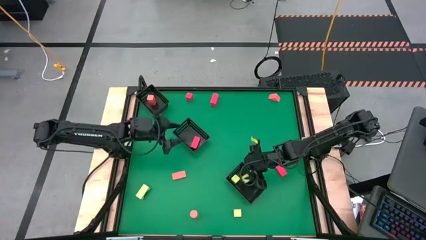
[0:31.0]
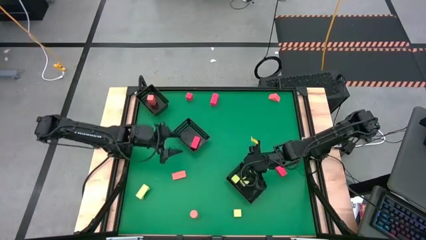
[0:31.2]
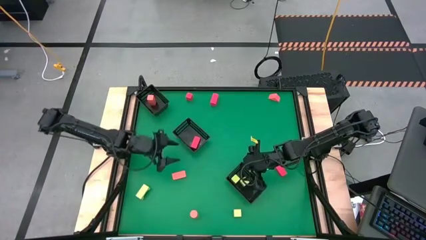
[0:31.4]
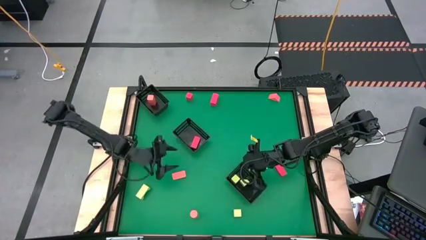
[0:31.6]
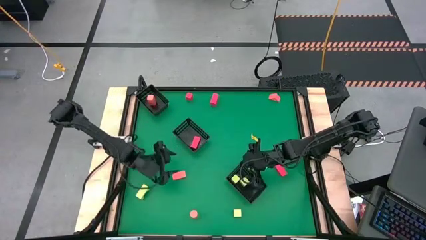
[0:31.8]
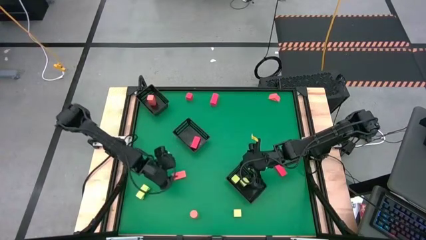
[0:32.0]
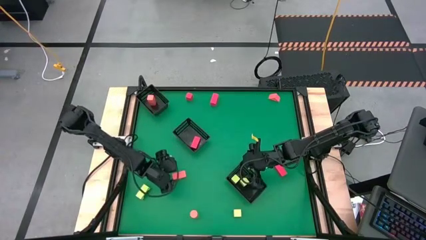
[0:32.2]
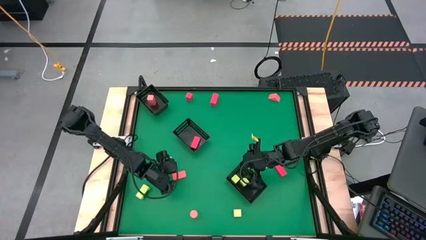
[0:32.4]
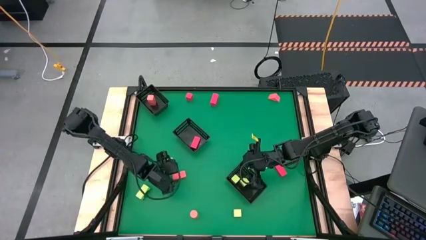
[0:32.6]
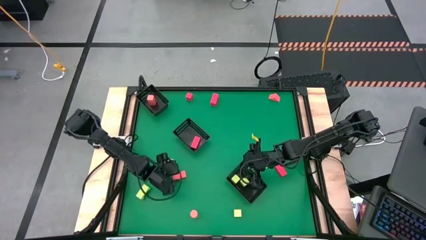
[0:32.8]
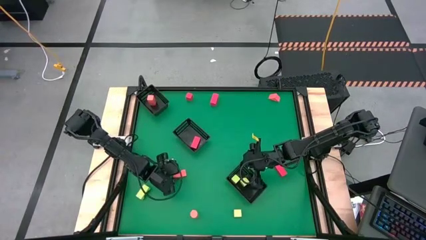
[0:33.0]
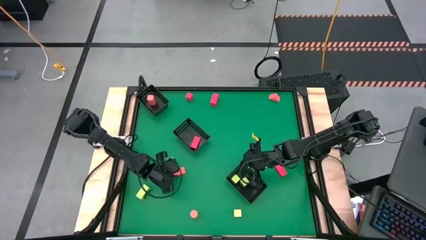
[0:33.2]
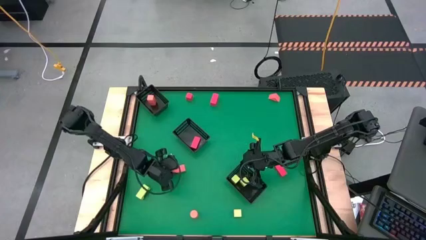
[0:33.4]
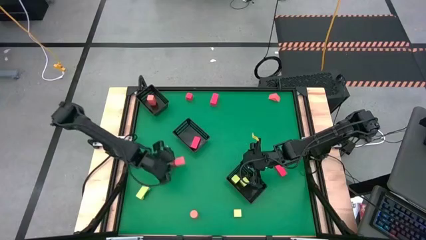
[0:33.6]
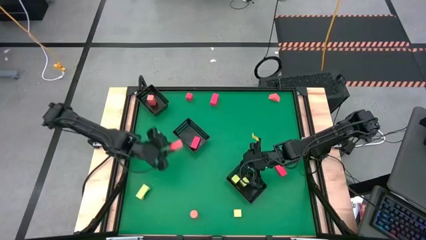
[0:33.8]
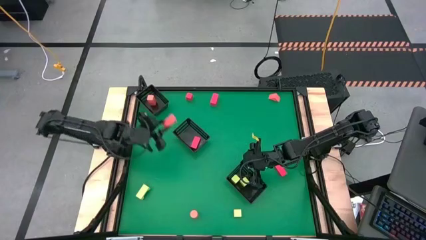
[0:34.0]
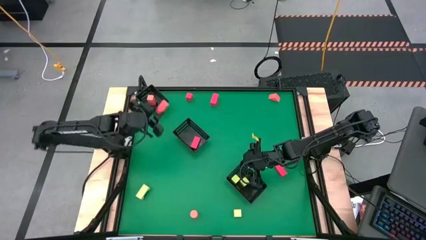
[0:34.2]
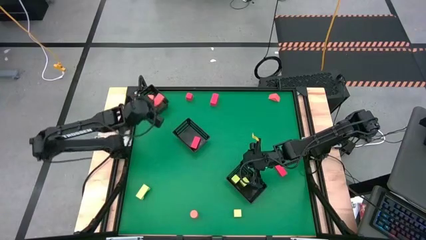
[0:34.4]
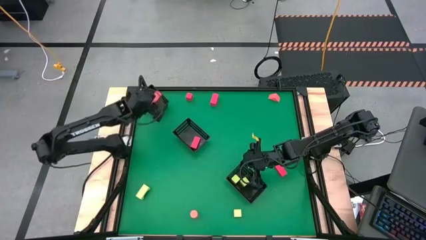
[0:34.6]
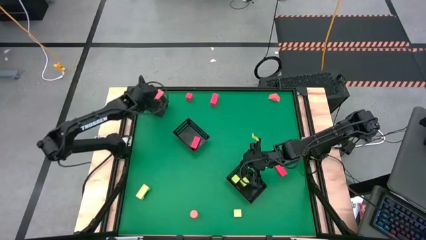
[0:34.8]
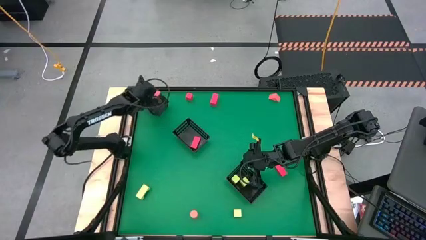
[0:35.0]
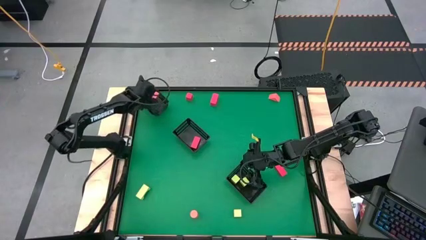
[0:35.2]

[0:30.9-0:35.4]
Task: Sort & place blocks by color
Put the light orange block into the top black bin

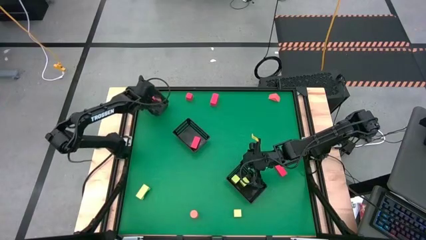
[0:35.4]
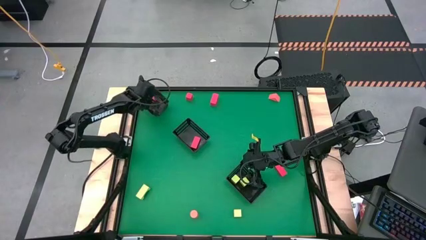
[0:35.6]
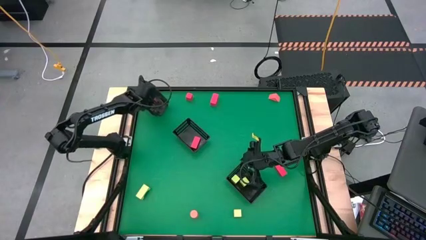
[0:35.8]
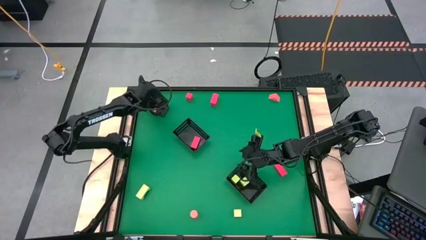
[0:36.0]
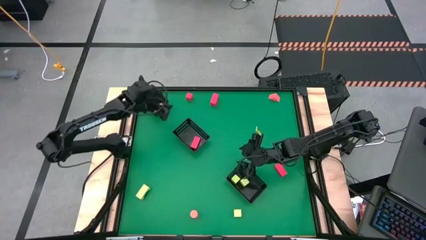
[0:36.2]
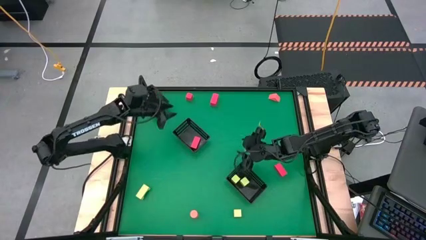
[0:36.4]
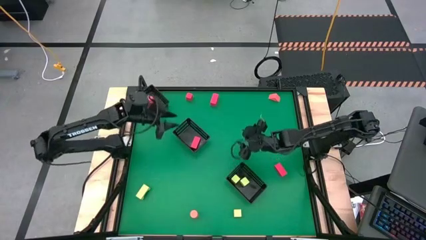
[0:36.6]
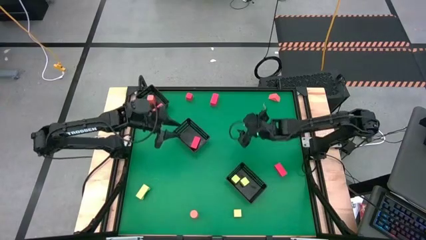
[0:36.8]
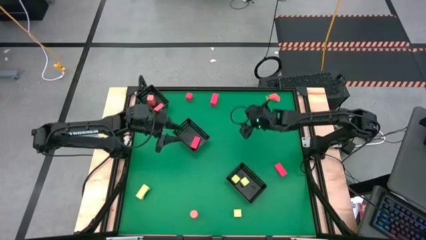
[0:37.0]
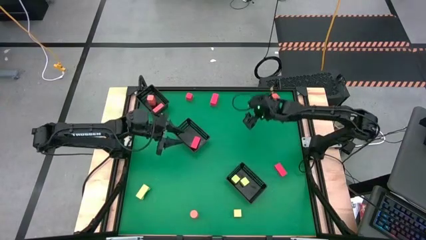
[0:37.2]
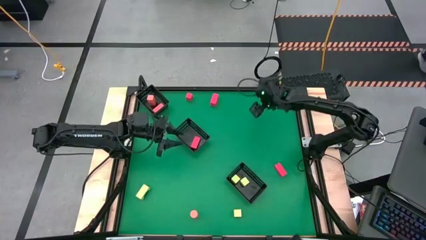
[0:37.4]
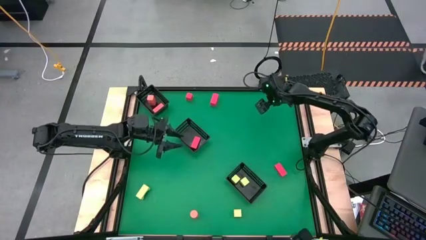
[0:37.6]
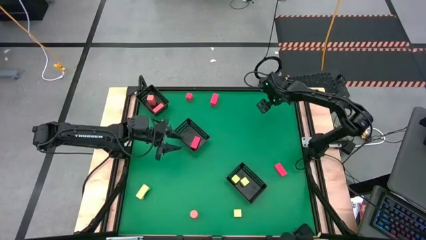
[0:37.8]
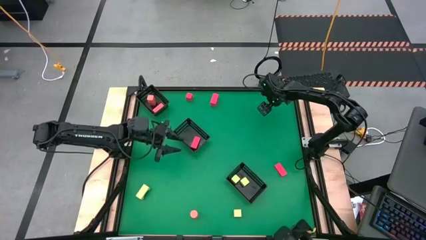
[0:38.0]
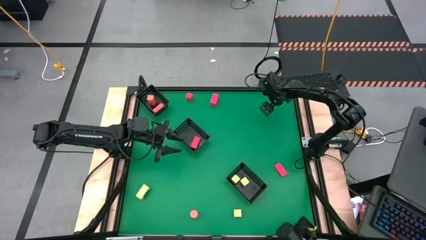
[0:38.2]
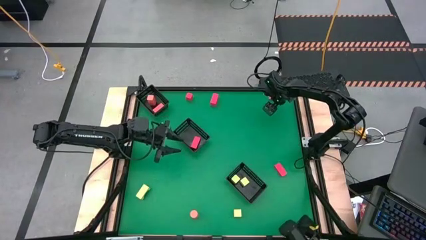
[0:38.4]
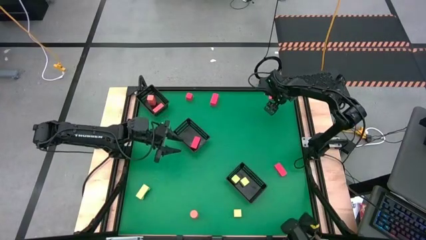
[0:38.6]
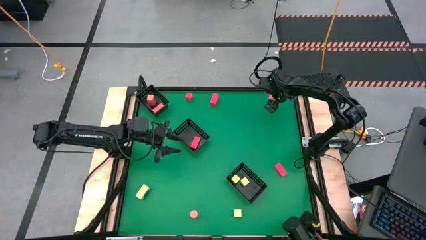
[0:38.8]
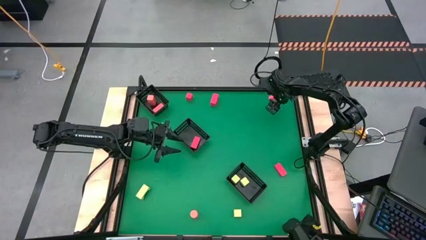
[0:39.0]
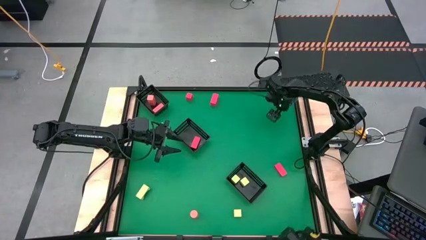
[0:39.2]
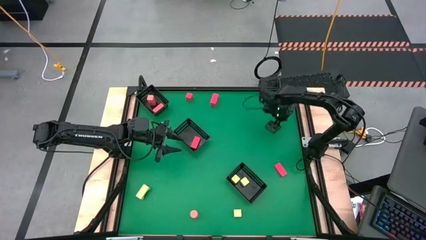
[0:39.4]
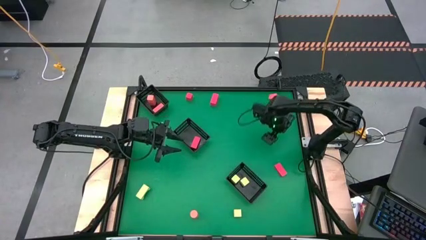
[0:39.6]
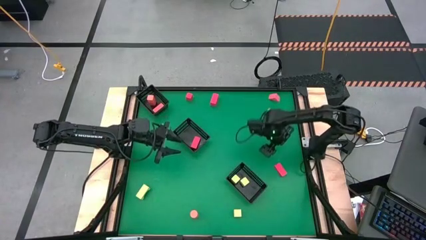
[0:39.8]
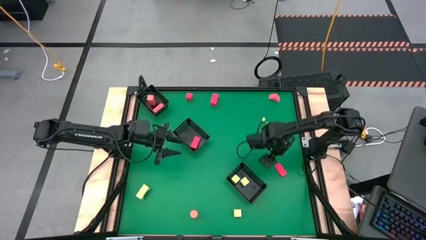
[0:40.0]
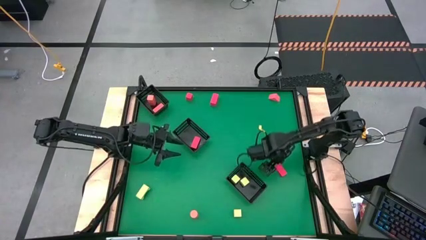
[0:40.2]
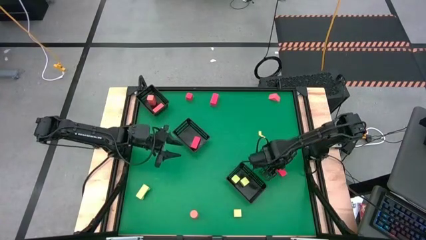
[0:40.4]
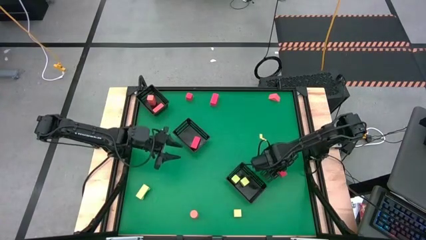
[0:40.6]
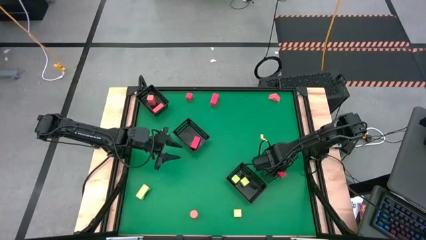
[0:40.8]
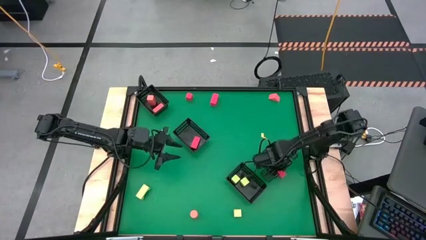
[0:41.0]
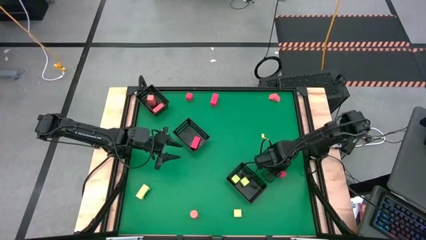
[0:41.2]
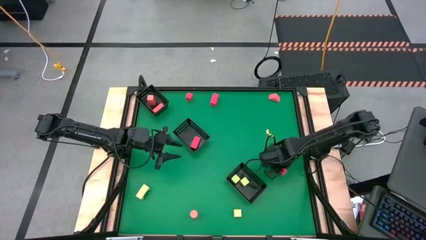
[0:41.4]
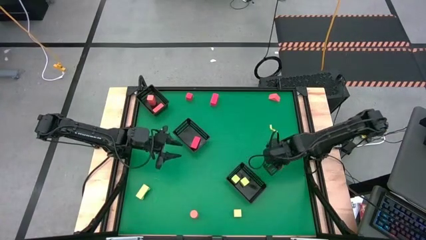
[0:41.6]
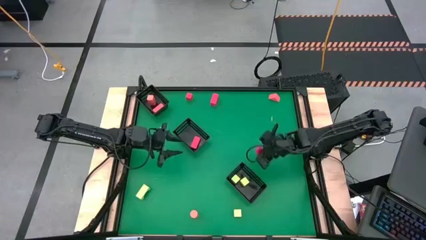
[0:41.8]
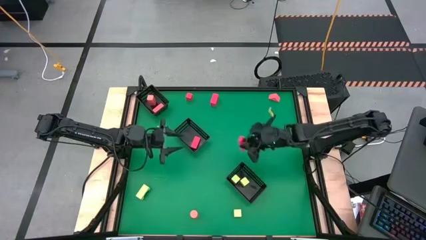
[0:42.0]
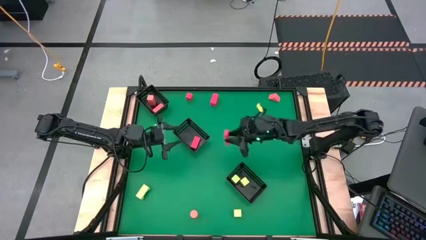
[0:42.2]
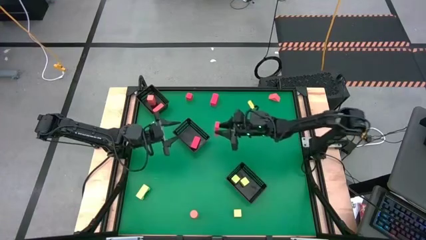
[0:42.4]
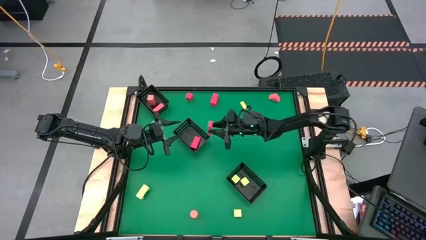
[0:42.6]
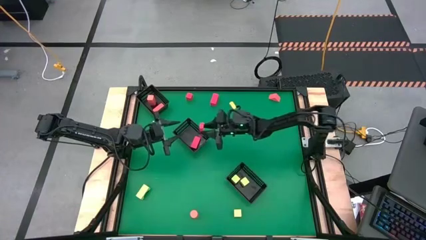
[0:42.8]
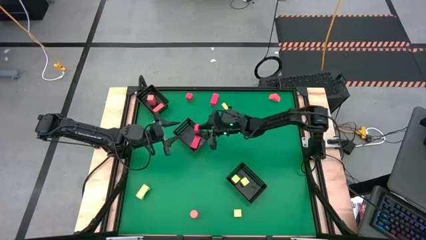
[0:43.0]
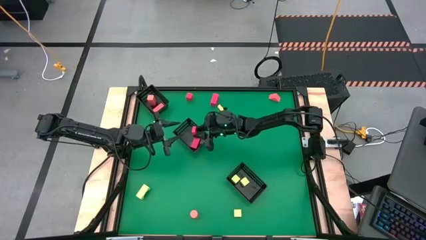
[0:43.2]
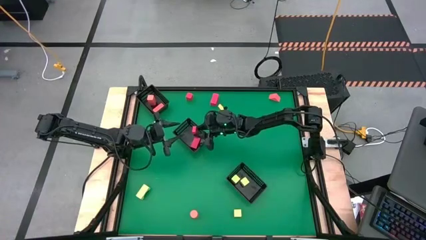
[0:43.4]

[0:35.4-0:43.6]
Put the red block into the middle black bin

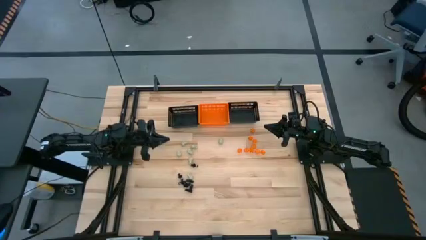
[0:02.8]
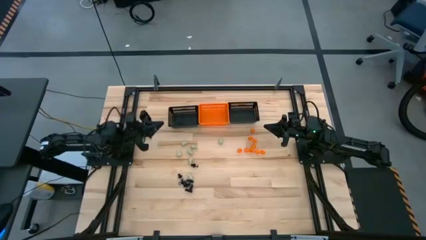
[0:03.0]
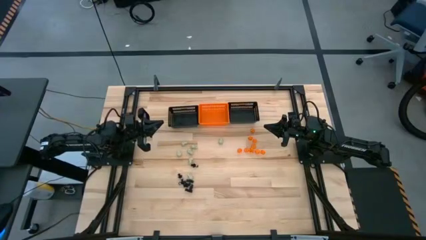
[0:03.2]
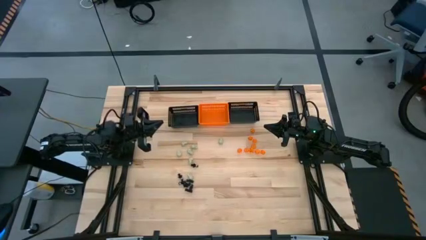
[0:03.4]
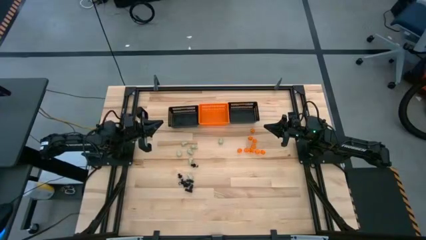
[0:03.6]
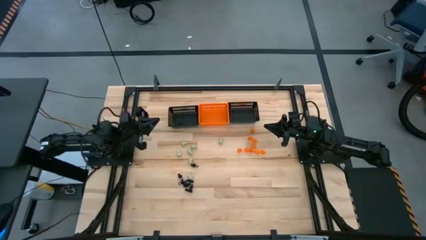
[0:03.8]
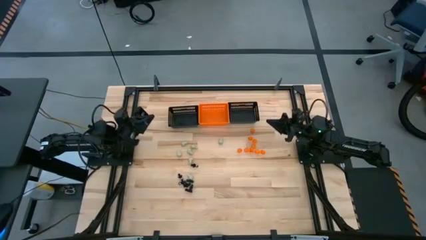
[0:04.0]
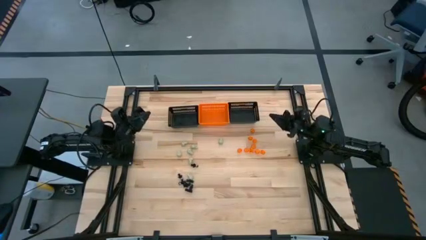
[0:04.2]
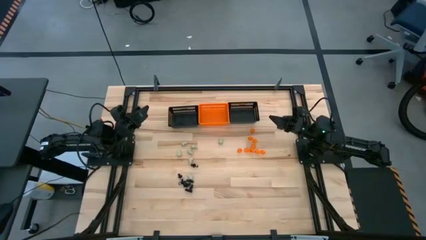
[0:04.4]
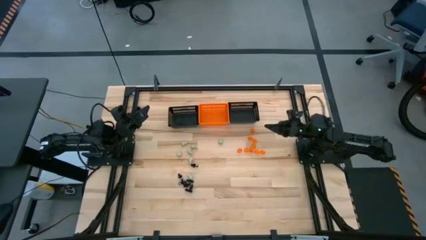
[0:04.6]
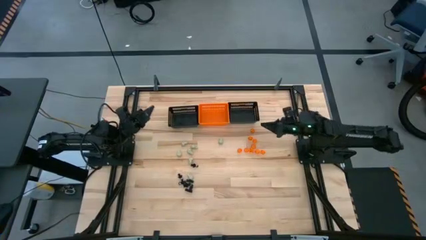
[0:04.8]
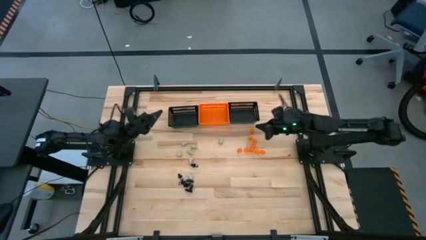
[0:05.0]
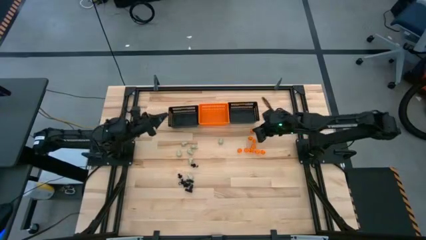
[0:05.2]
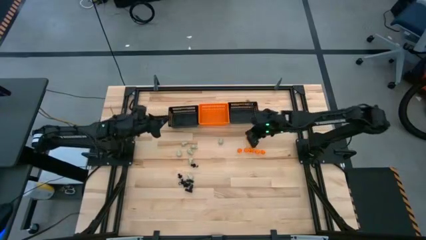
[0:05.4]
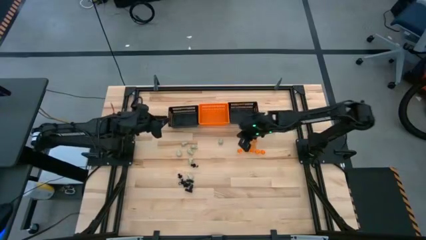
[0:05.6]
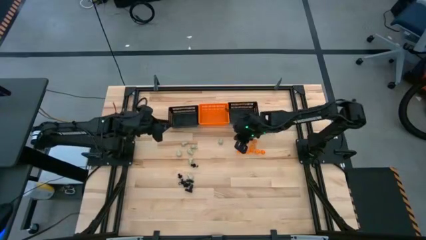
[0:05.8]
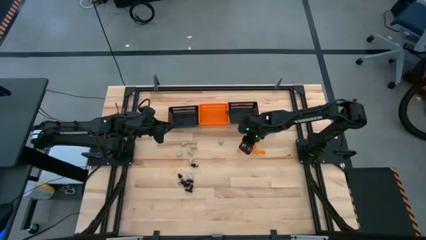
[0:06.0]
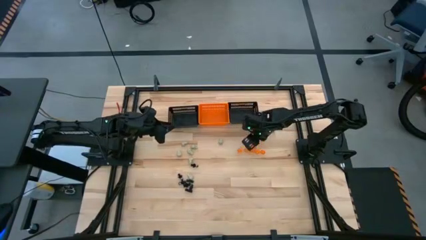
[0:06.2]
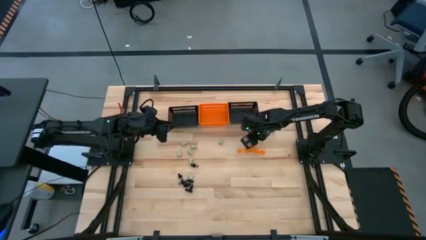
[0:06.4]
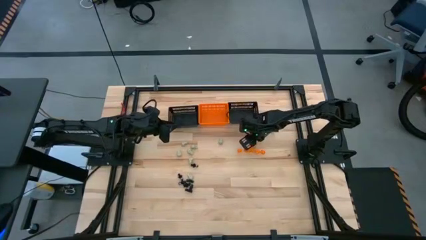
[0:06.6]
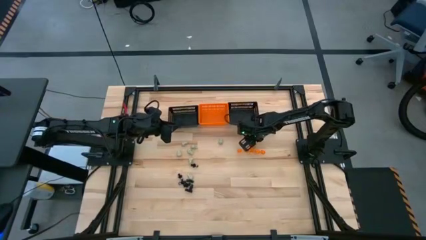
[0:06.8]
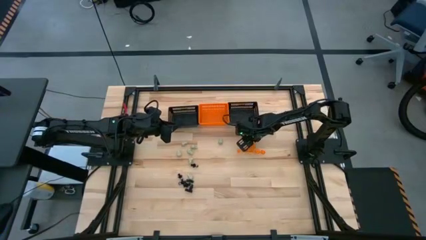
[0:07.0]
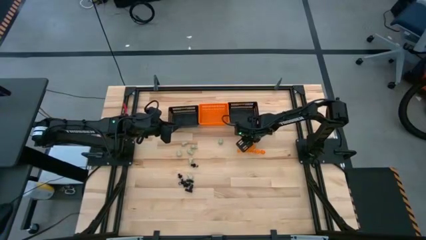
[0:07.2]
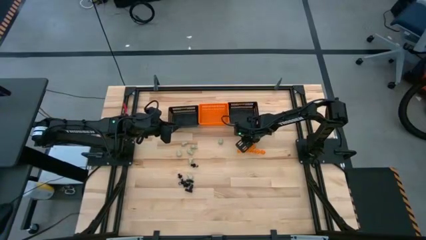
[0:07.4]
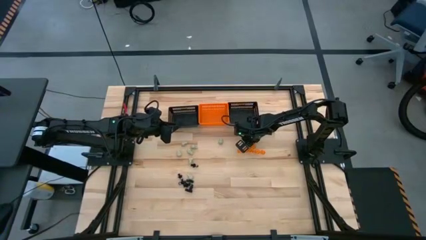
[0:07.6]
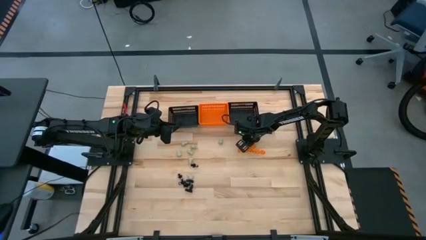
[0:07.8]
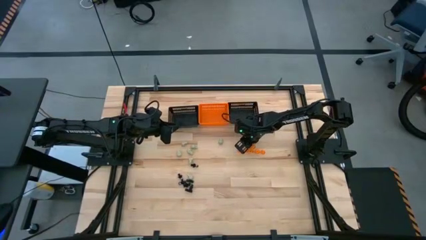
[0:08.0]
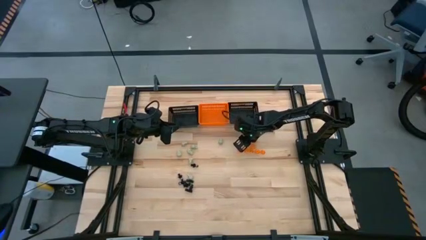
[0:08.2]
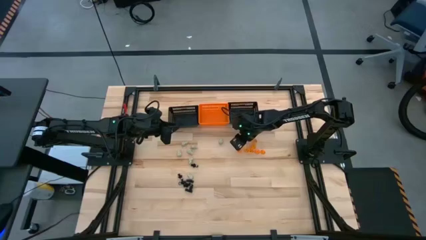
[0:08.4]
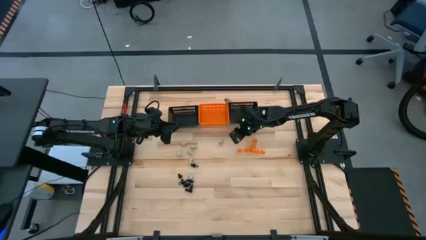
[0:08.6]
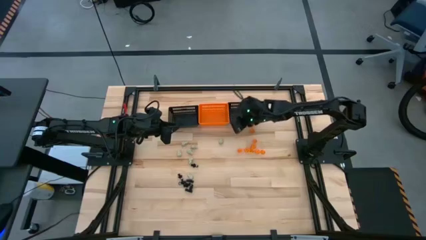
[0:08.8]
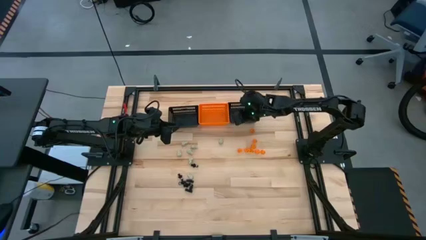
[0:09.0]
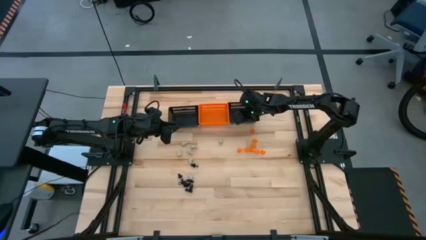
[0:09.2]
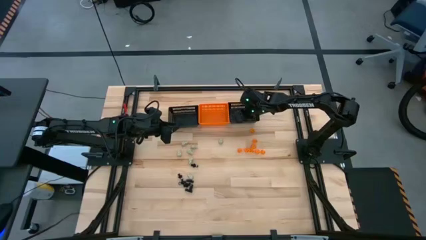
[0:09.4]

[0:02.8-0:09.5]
Task: Sort Halloween decoration
Put the orange pumpkin toy into the right black bin
